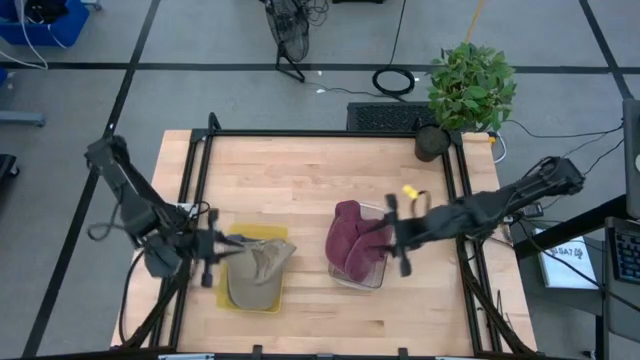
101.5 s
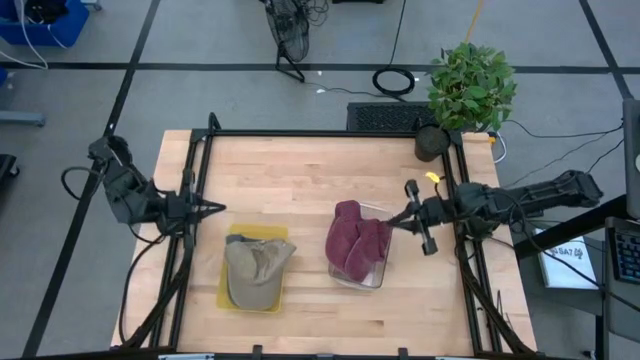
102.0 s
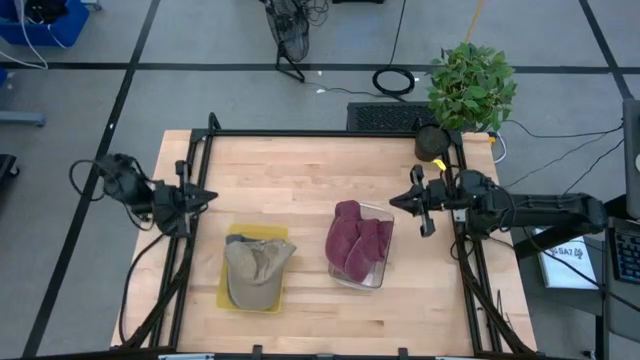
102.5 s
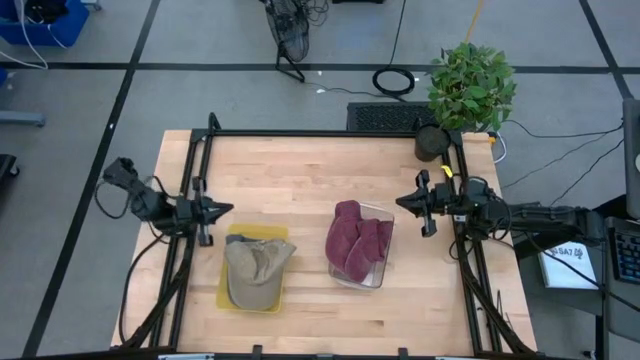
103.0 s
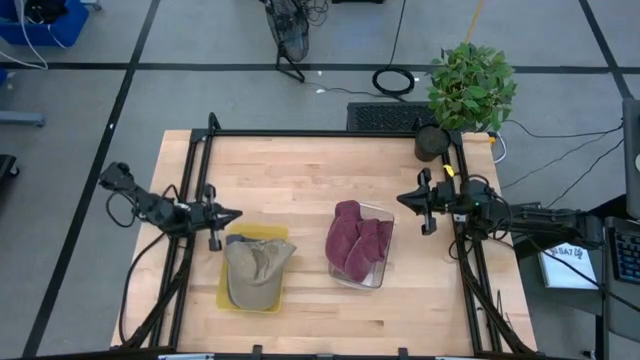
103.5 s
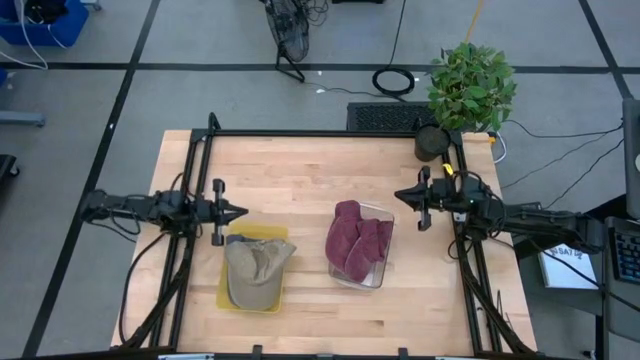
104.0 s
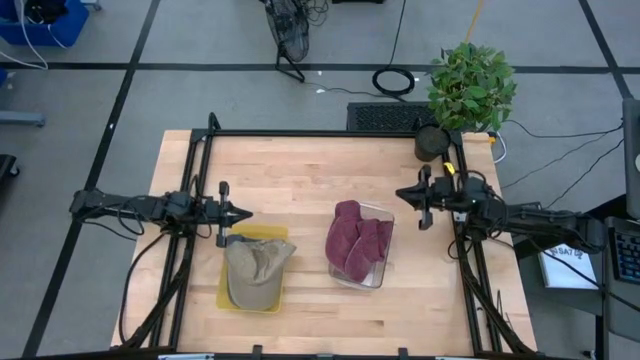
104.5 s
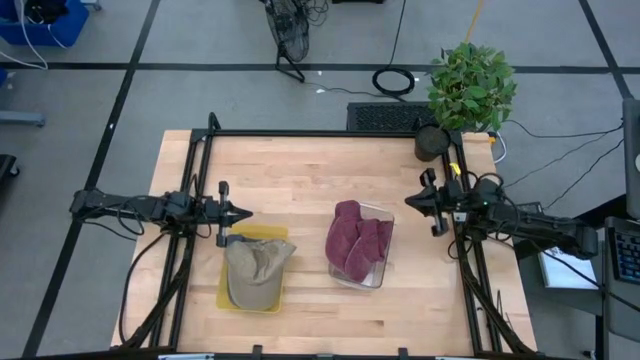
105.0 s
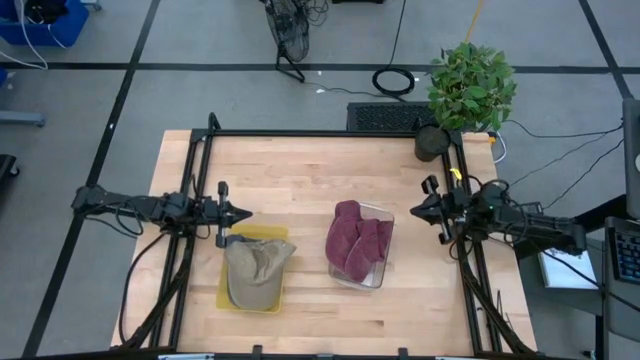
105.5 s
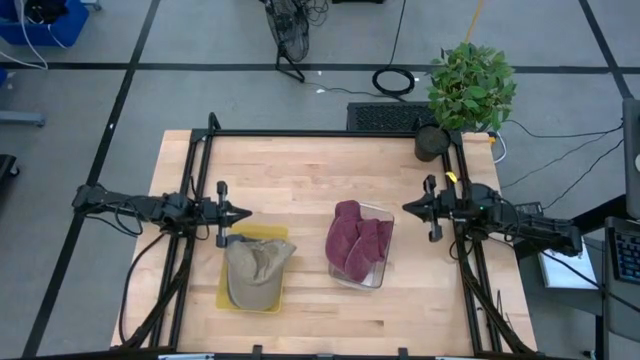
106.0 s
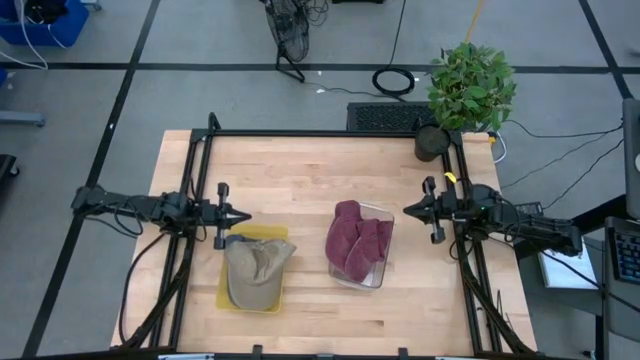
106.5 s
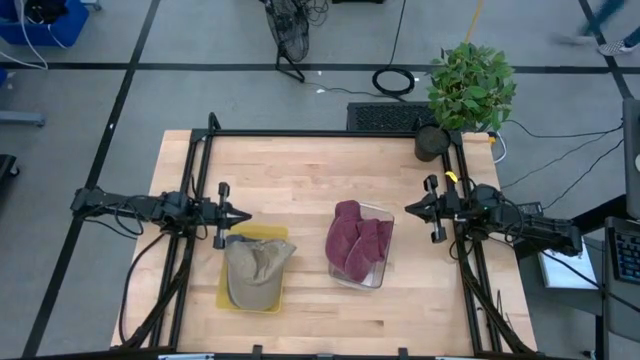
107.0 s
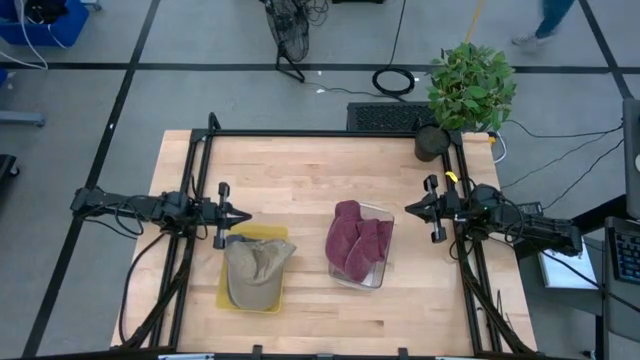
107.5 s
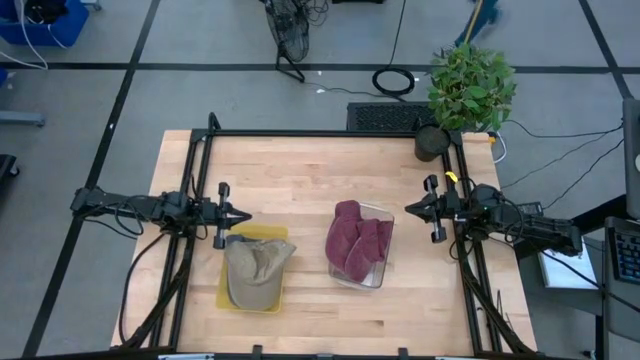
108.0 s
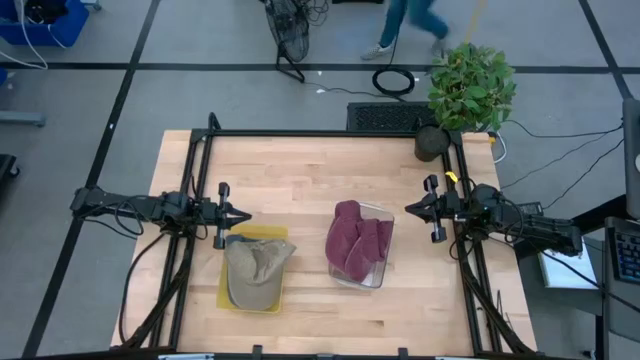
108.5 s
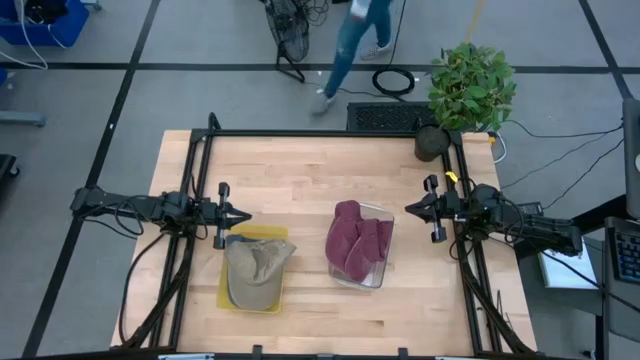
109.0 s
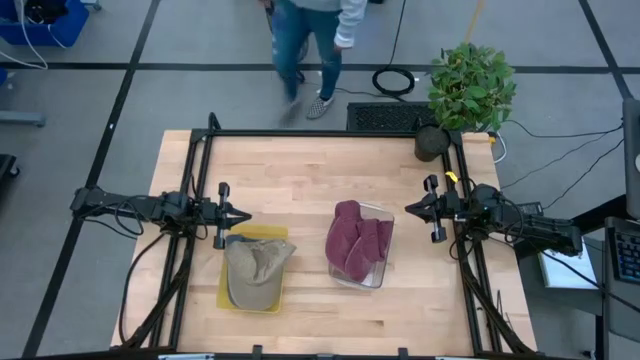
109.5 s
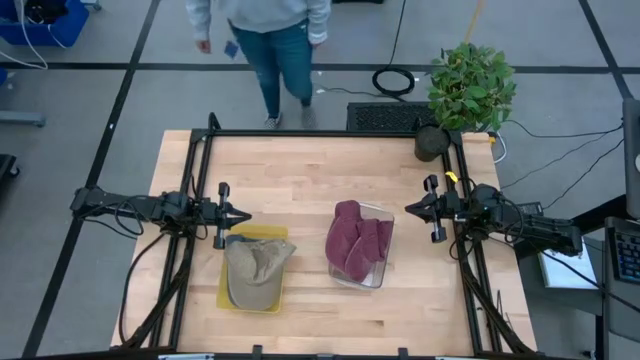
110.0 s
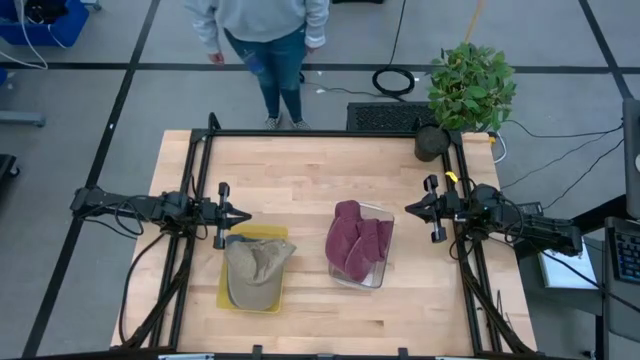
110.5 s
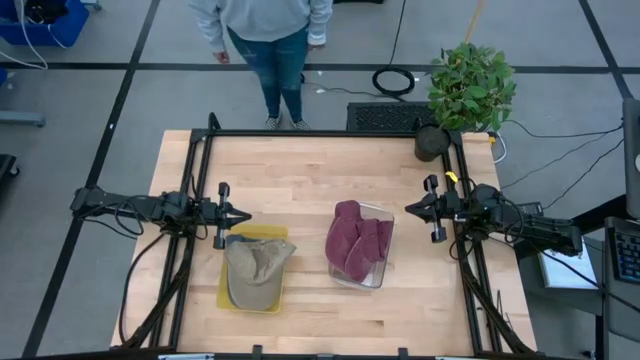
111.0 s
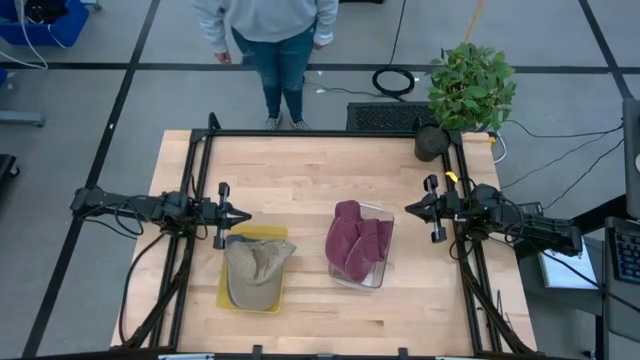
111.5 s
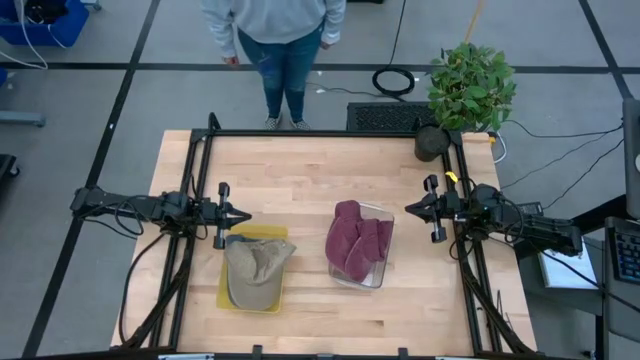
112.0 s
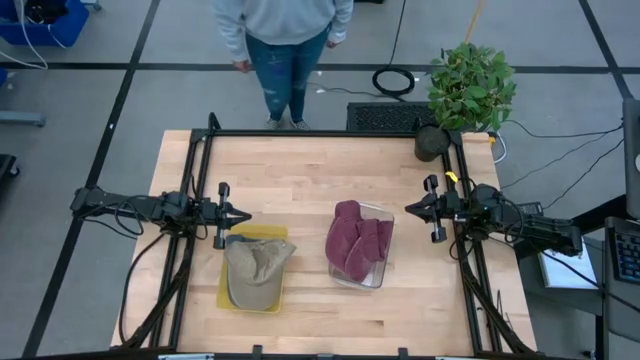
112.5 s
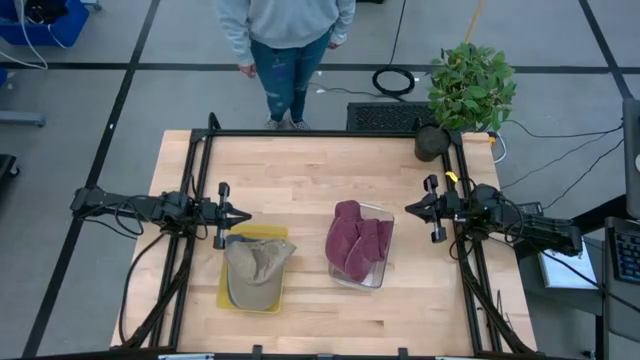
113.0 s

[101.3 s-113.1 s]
Task: Pick & Place hat
Return to Home Position
